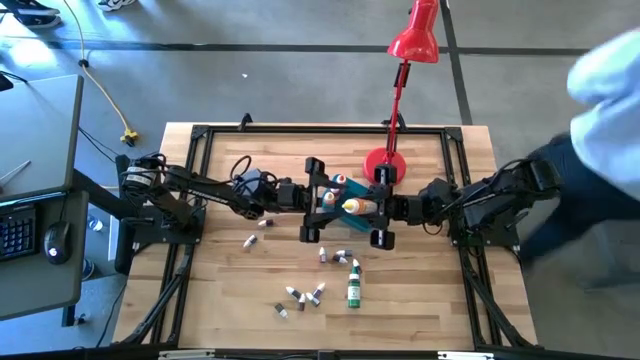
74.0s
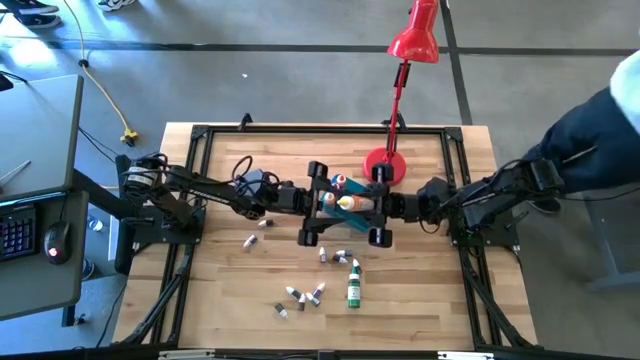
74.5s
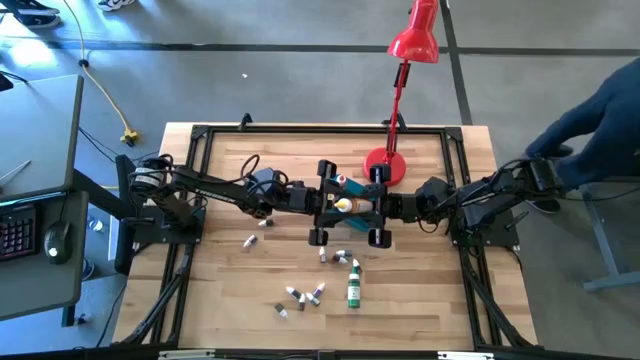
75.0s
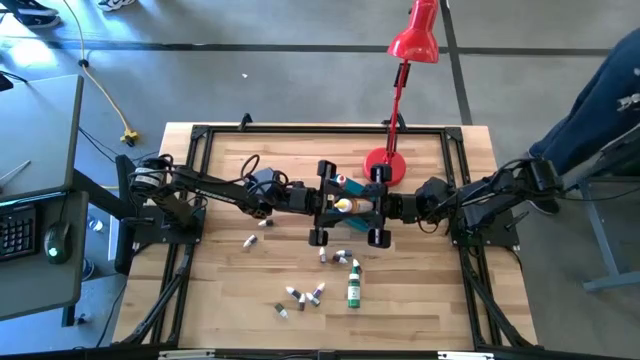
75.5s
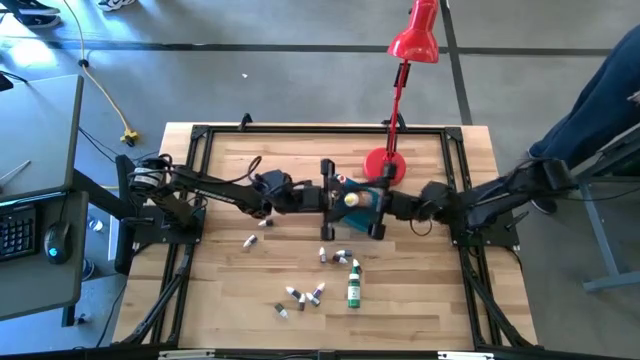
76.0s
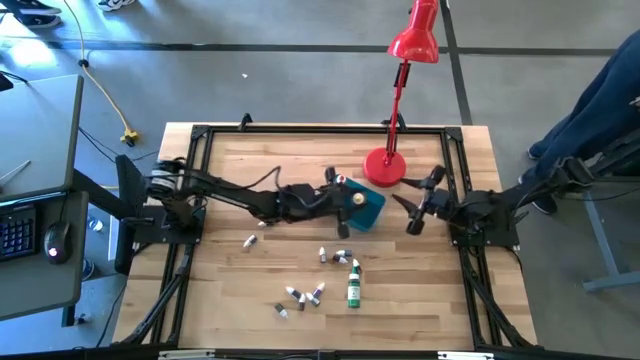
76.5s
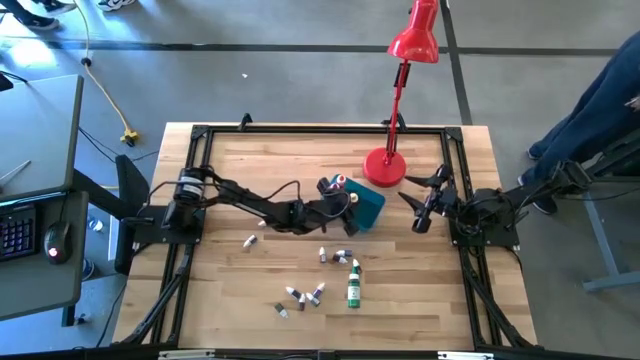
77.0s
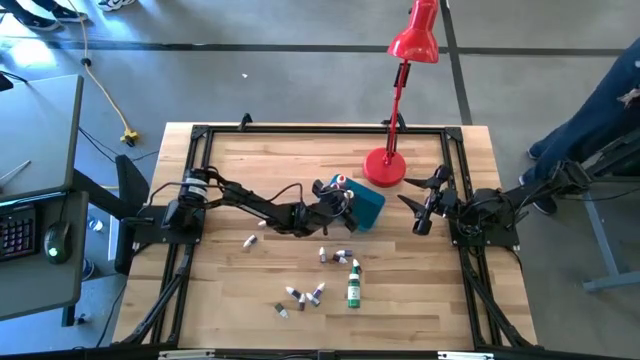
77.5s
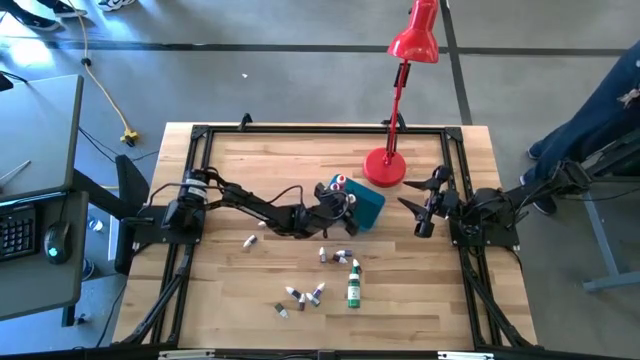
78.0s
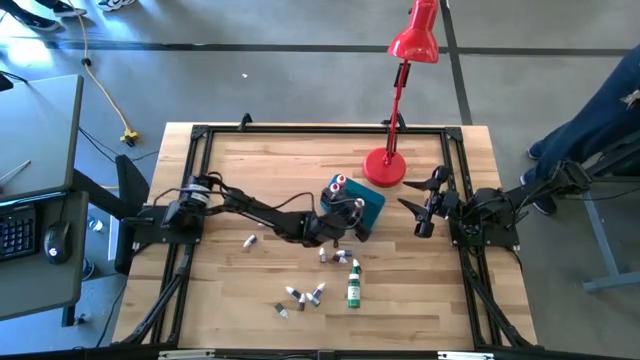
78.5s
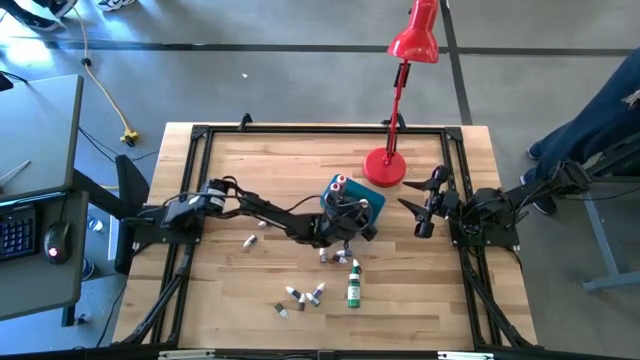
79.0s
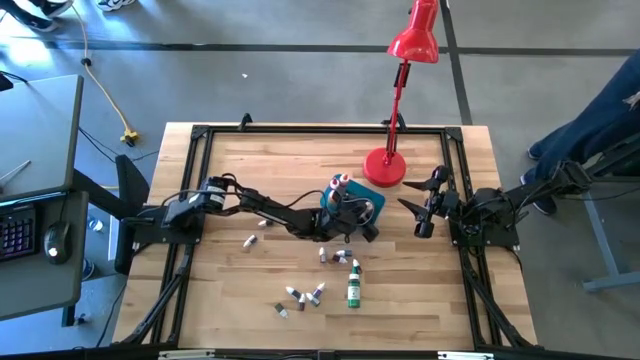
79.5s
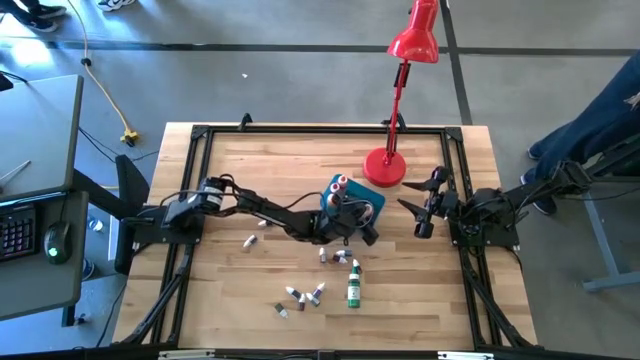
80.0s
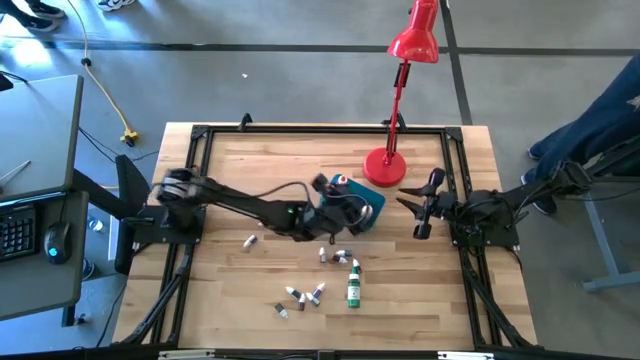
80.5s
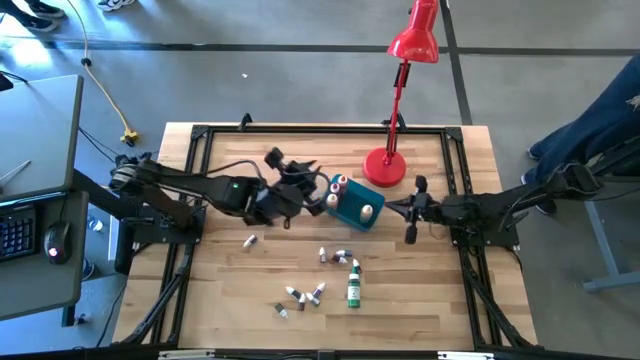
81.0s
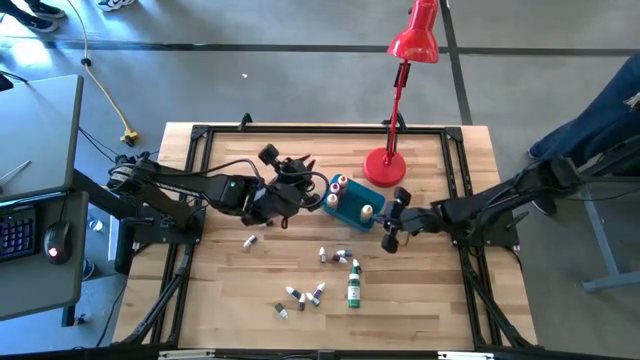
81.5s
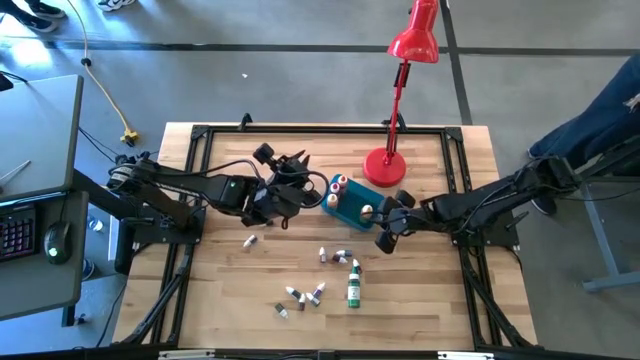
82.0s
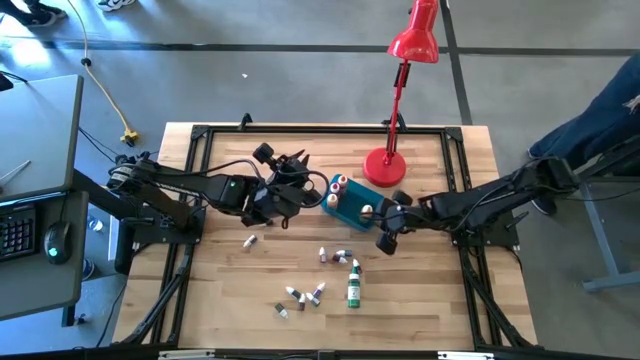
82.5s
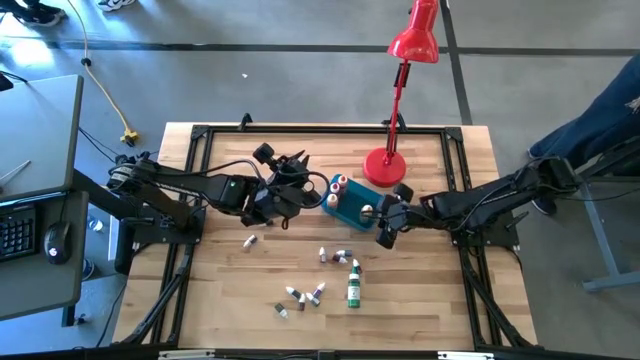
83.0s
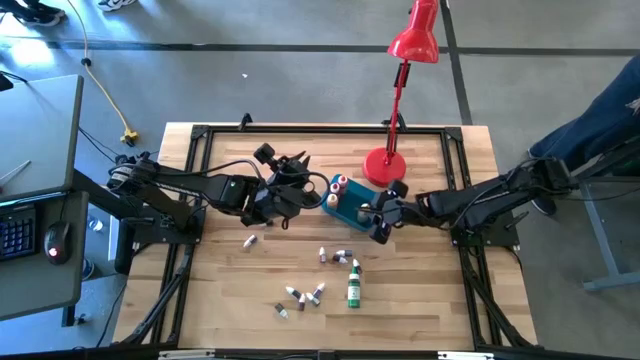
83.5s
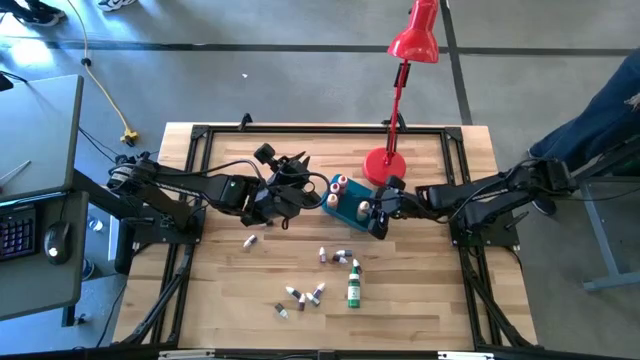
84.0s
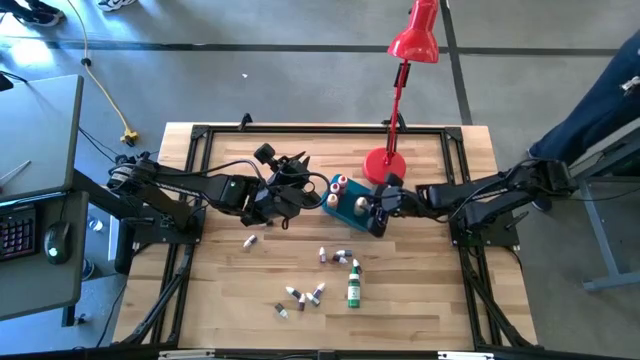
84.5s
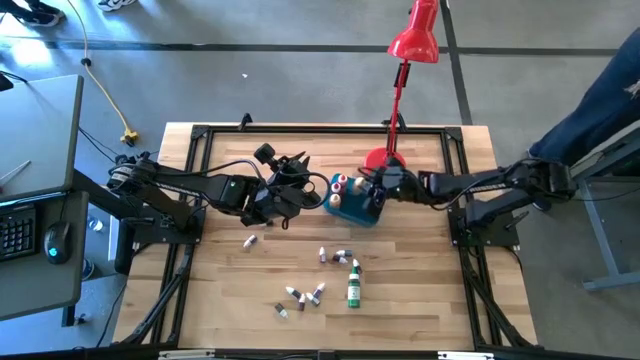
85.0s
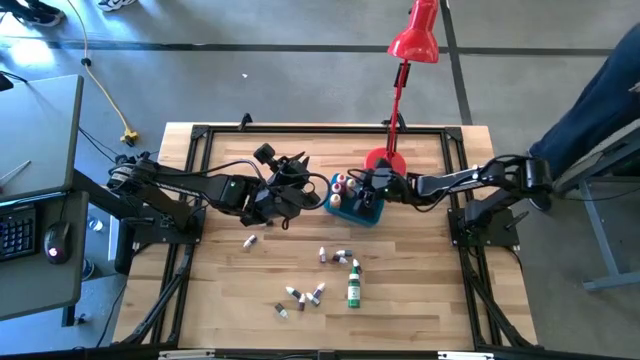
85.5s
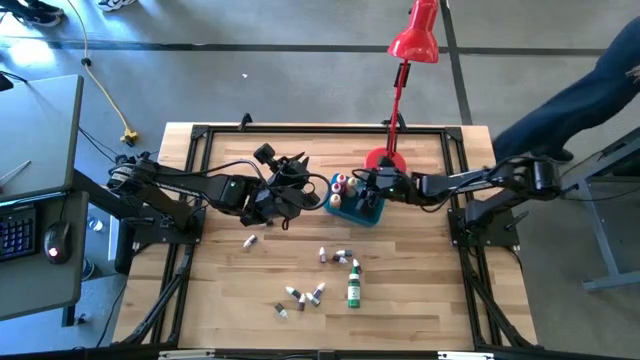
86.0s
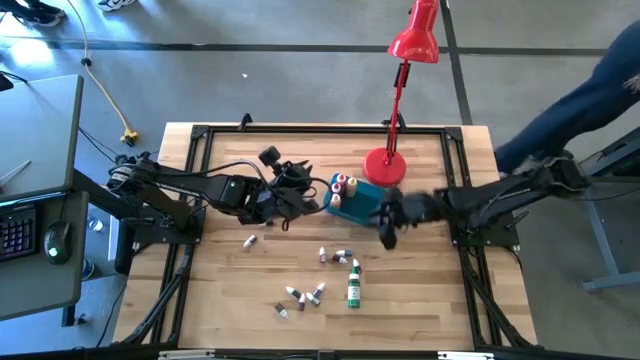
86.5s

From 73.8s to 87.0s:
Task: Pick & Place food coloring
Put the big yellow food coloring bottle into the blue container

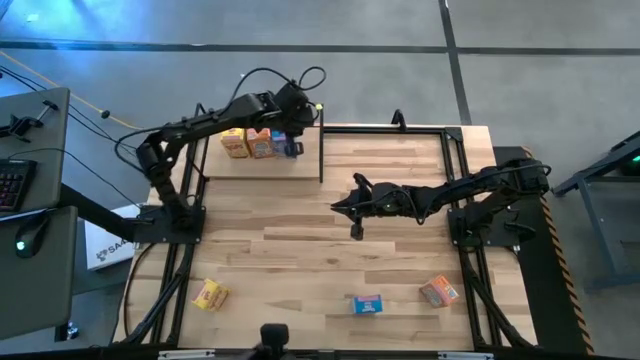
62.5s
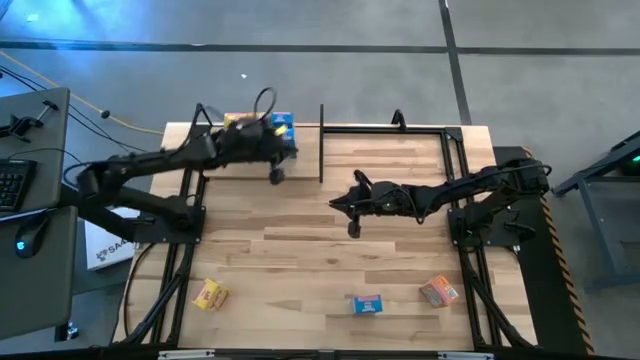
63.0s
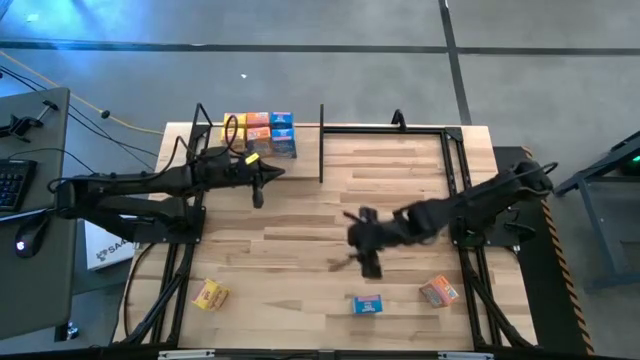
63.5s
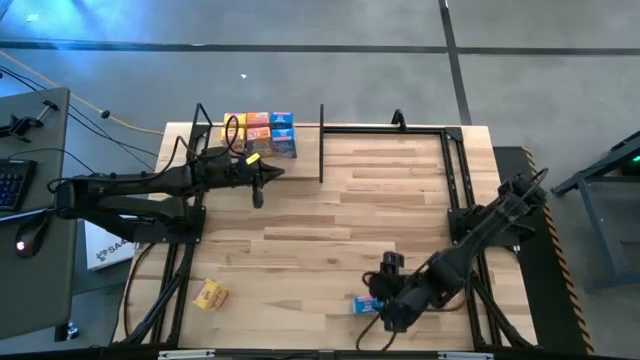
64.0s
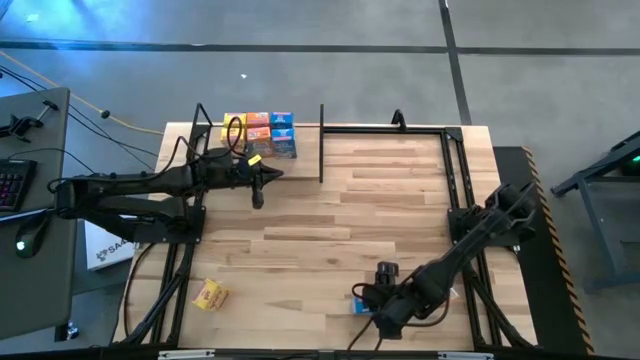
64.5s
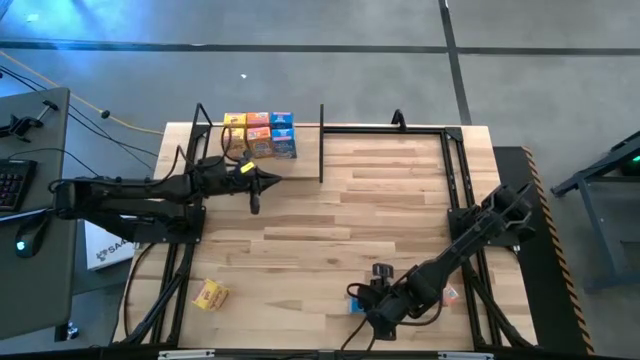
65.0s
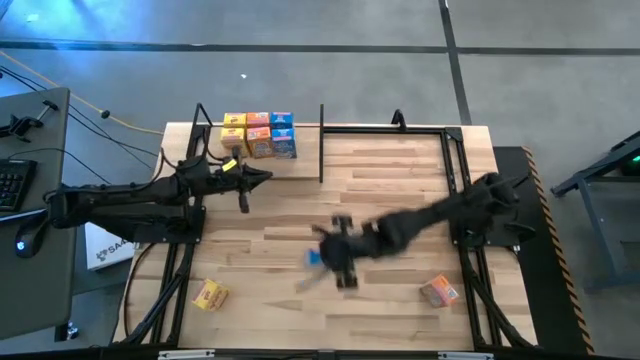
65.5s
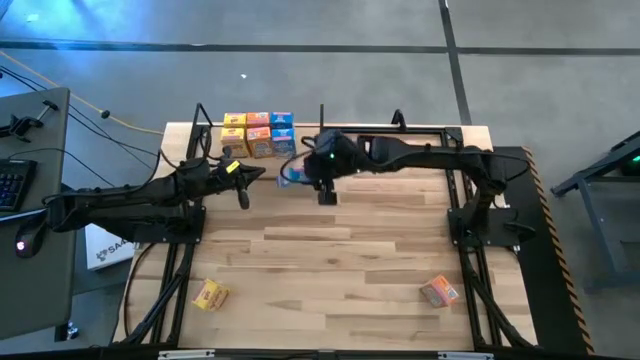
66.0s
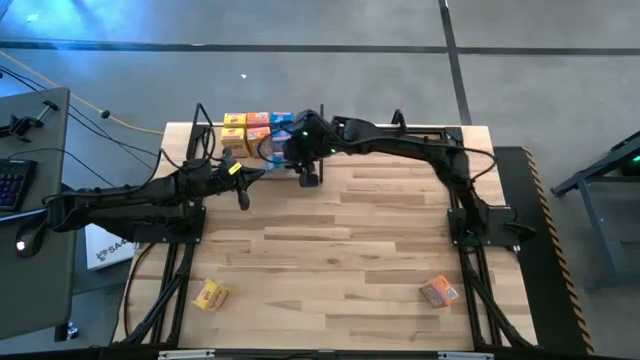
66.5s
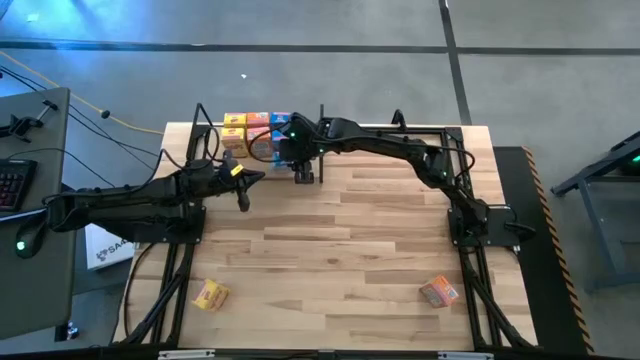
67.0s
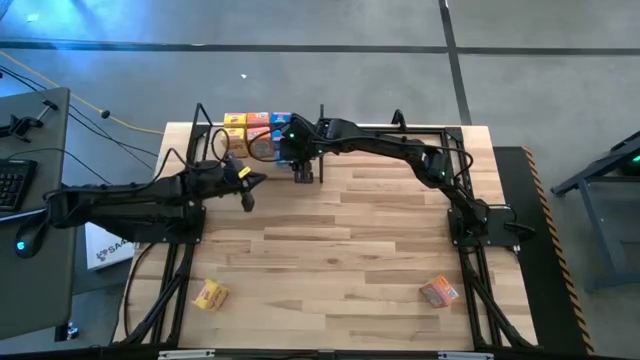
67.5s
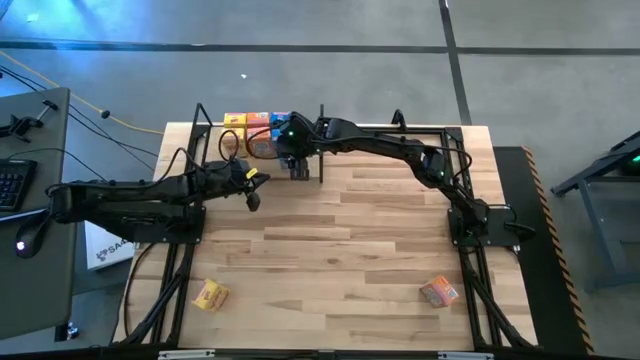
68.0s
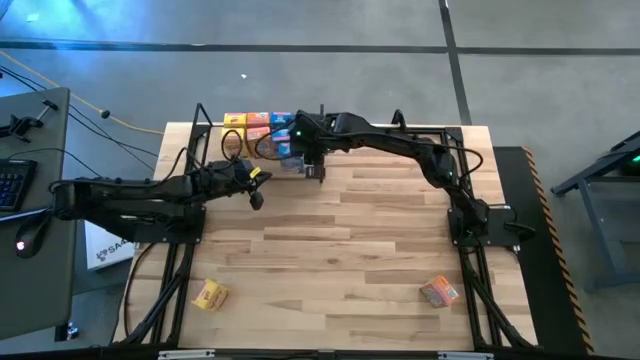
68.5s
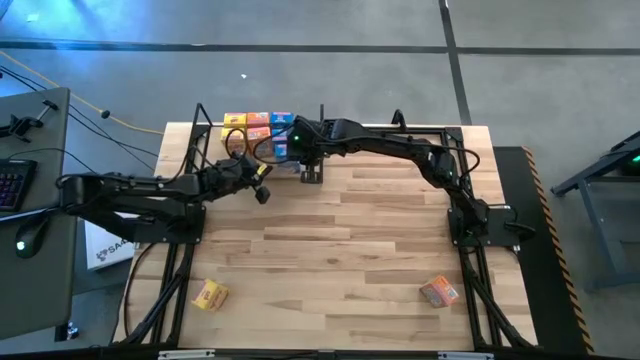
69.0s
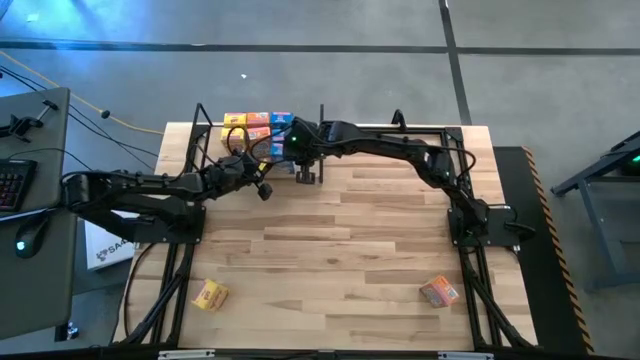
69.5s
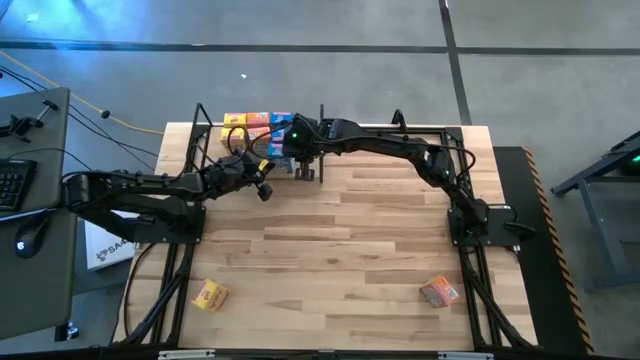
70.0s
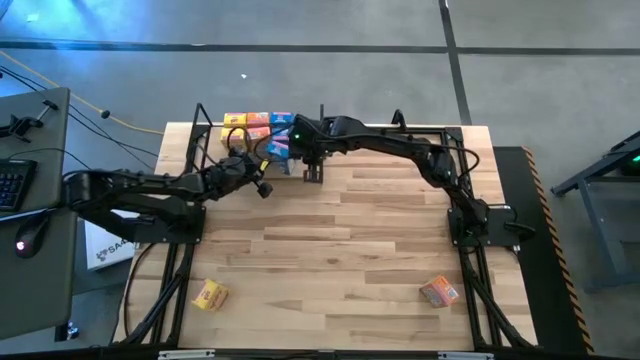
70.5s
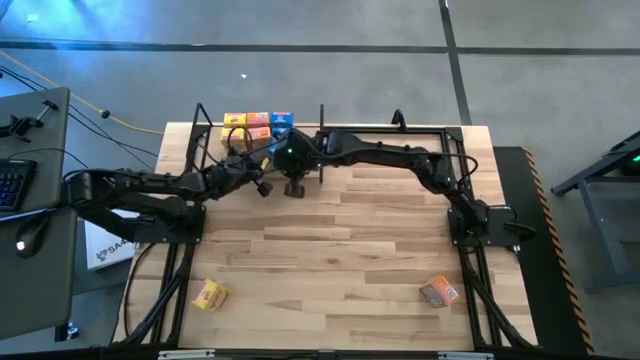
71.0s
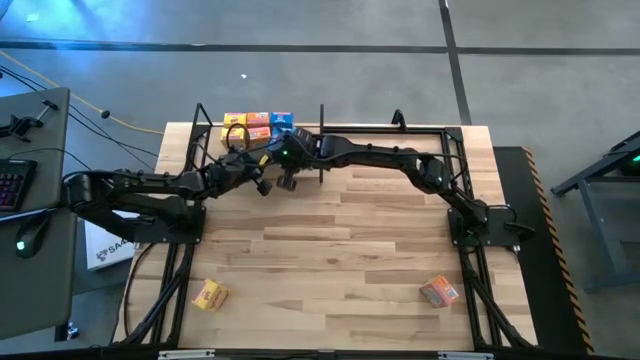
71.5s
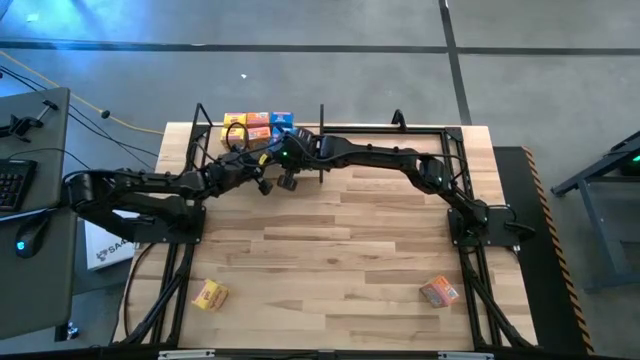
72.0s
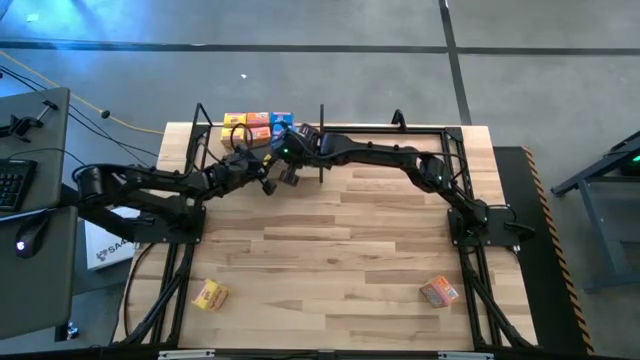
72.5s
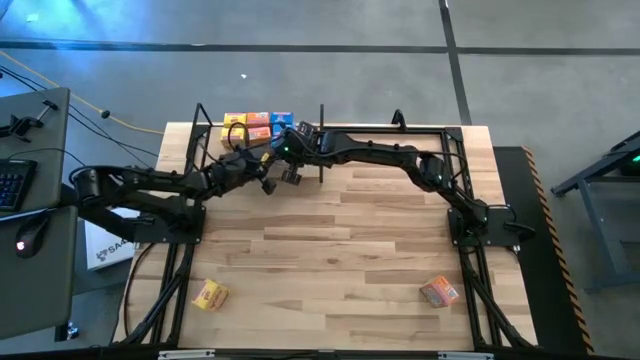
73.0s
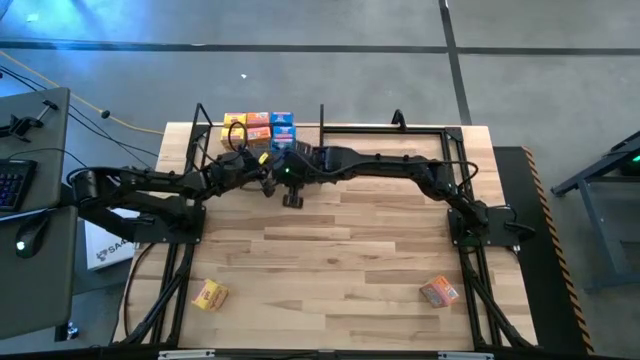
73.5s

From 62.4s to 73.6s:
Task: Stack cereal on shelf
Put the blue cereal box on the shelf aligned with the other blue cereal boxes
